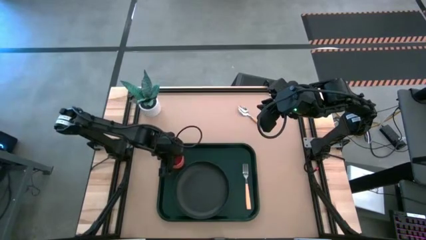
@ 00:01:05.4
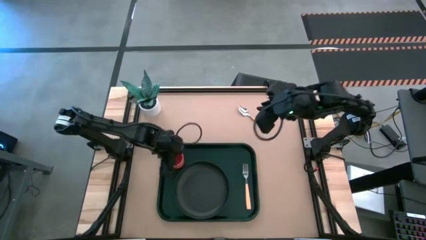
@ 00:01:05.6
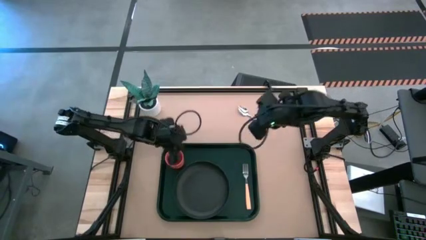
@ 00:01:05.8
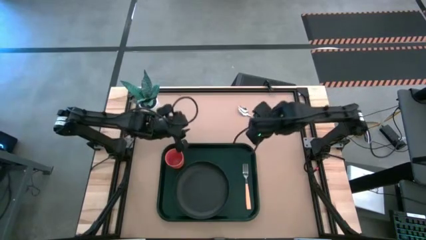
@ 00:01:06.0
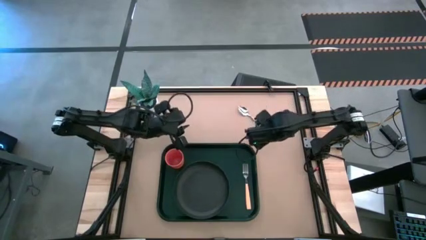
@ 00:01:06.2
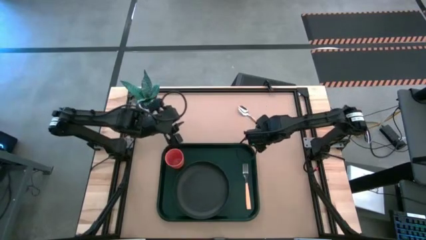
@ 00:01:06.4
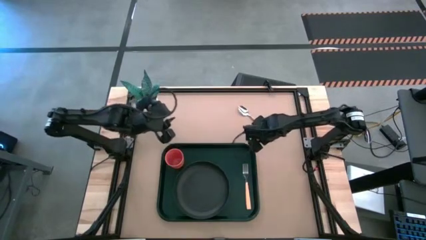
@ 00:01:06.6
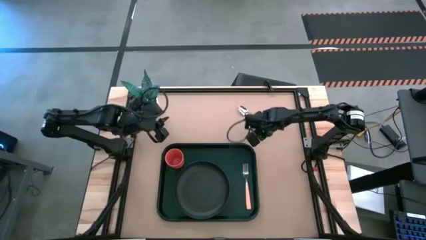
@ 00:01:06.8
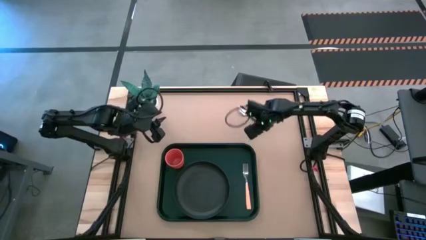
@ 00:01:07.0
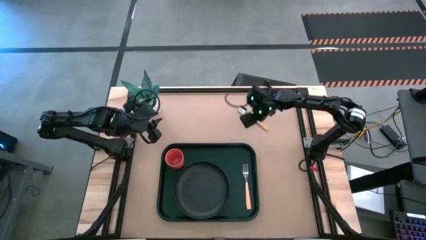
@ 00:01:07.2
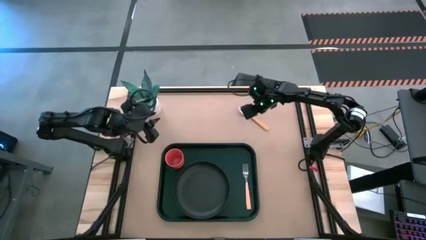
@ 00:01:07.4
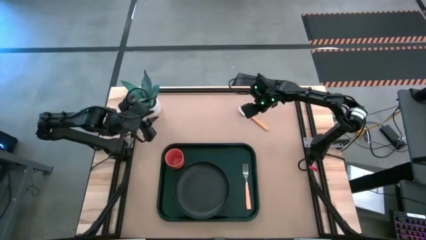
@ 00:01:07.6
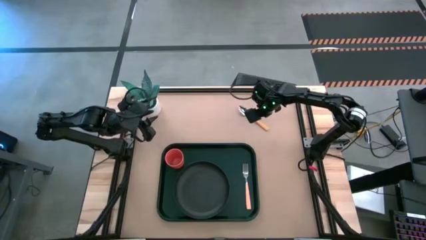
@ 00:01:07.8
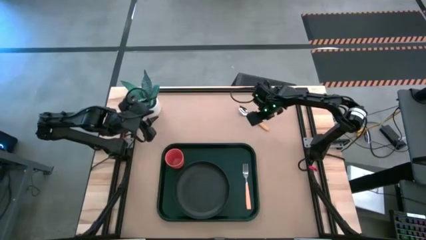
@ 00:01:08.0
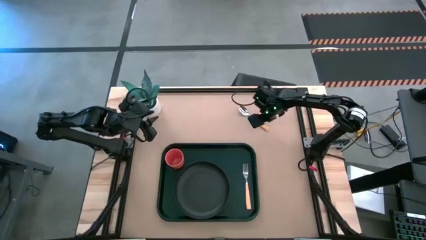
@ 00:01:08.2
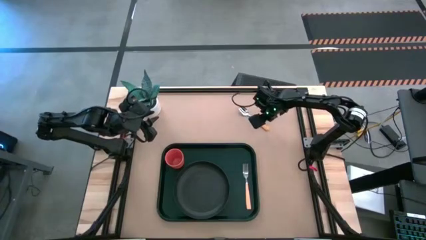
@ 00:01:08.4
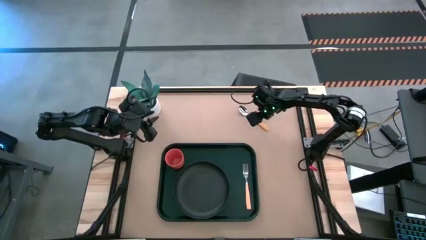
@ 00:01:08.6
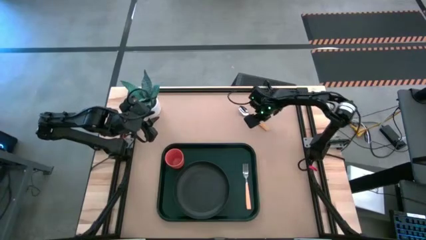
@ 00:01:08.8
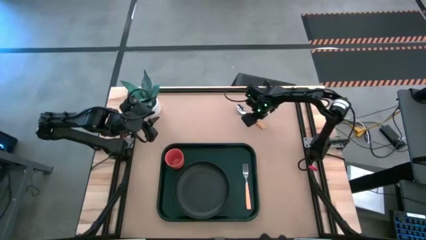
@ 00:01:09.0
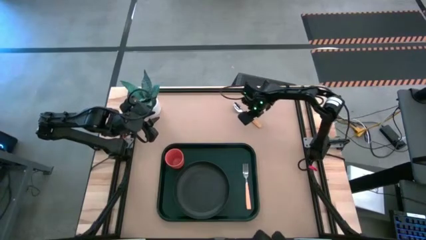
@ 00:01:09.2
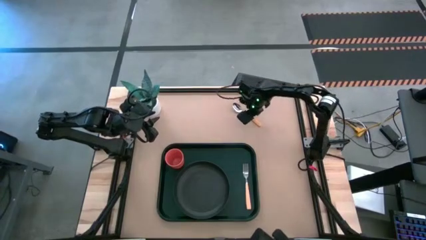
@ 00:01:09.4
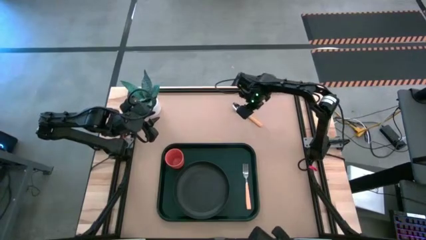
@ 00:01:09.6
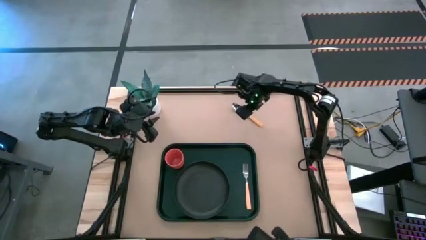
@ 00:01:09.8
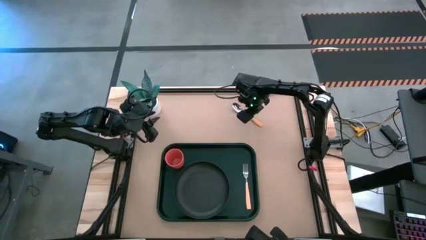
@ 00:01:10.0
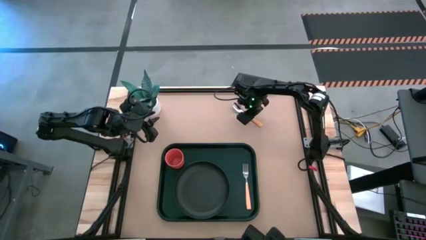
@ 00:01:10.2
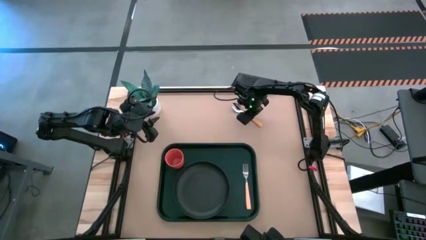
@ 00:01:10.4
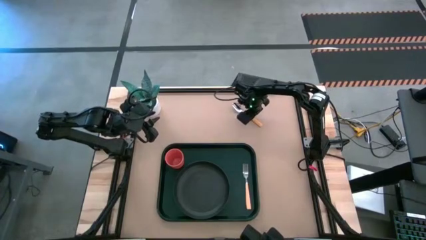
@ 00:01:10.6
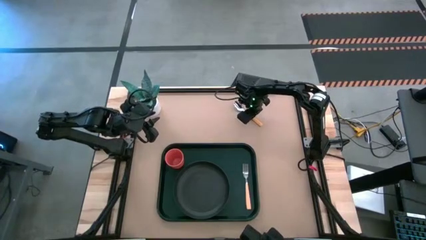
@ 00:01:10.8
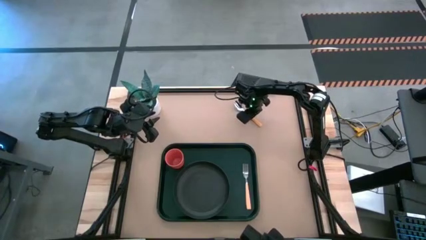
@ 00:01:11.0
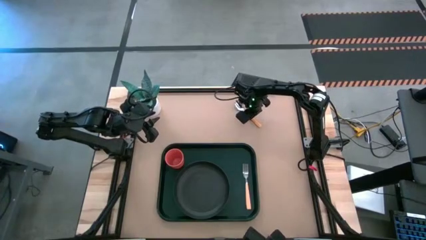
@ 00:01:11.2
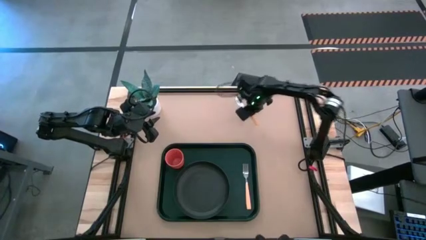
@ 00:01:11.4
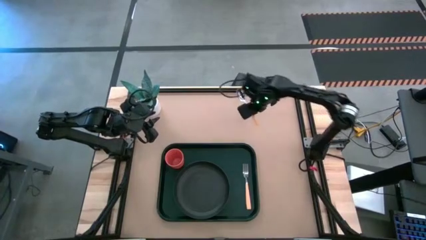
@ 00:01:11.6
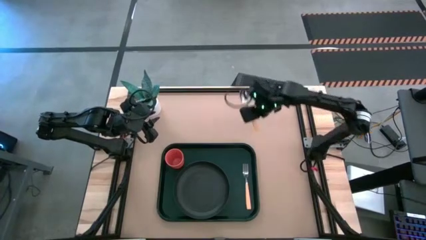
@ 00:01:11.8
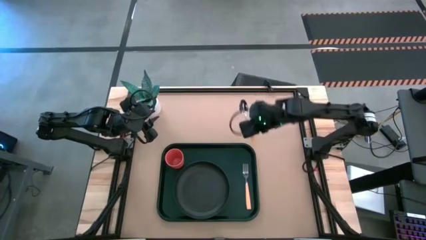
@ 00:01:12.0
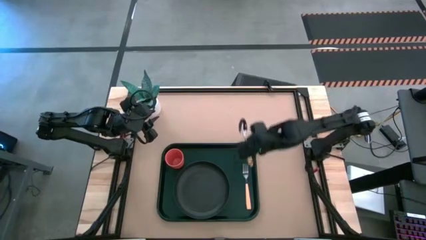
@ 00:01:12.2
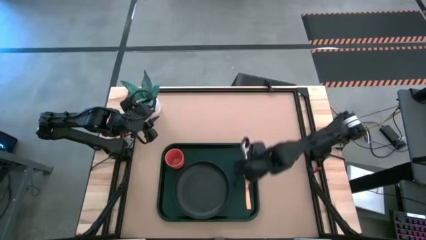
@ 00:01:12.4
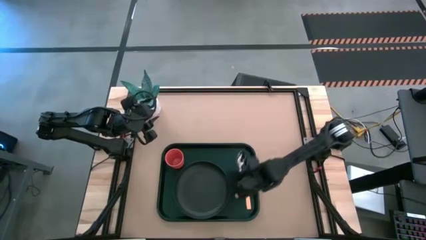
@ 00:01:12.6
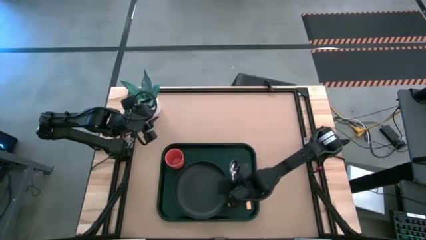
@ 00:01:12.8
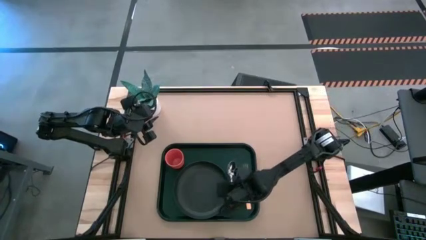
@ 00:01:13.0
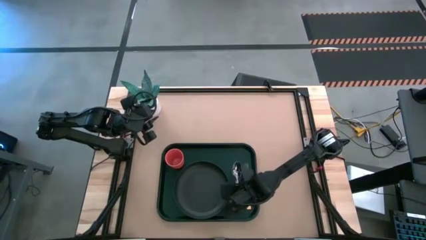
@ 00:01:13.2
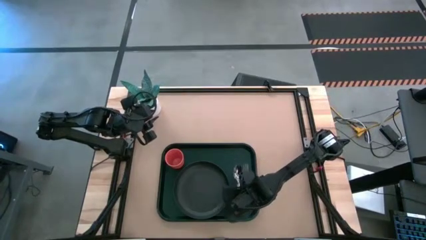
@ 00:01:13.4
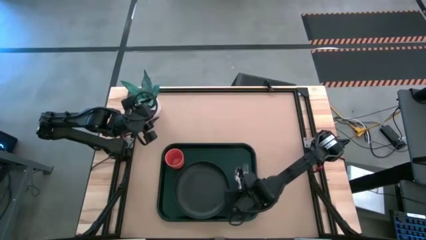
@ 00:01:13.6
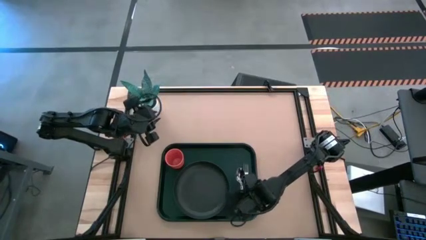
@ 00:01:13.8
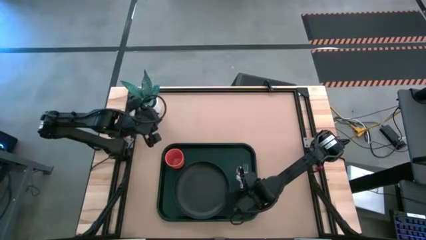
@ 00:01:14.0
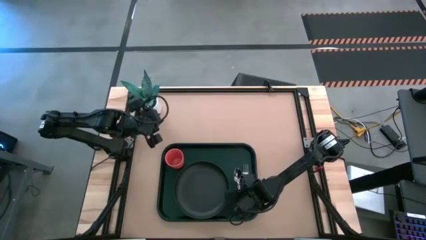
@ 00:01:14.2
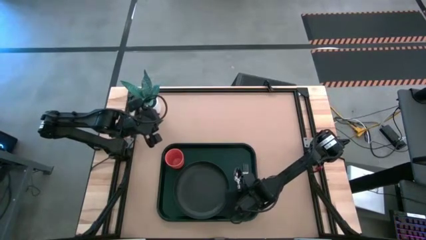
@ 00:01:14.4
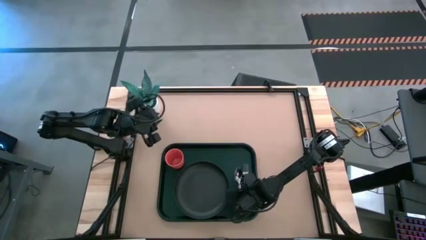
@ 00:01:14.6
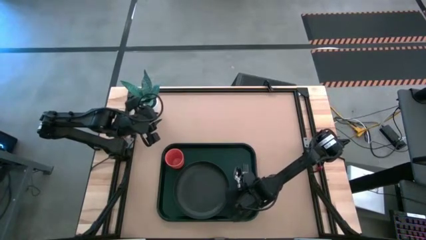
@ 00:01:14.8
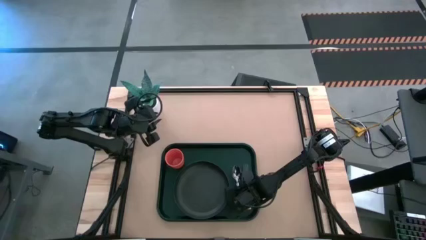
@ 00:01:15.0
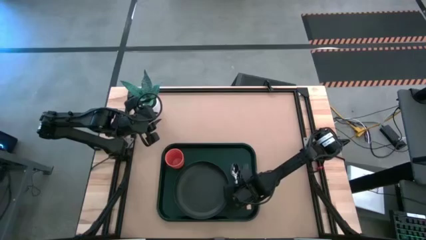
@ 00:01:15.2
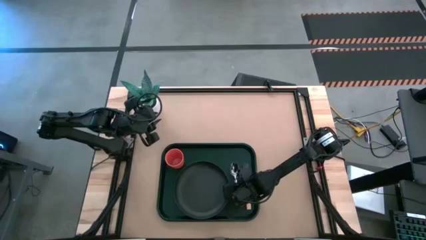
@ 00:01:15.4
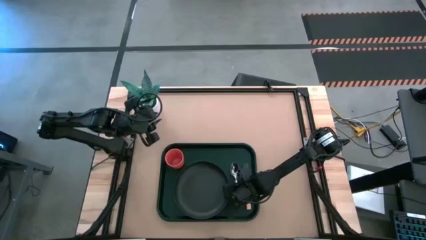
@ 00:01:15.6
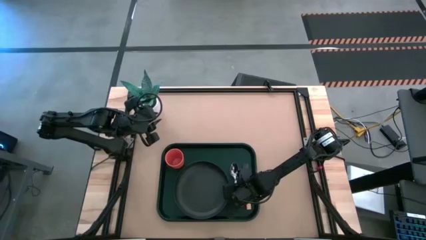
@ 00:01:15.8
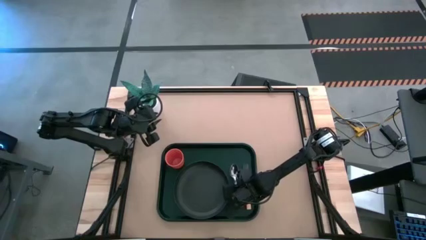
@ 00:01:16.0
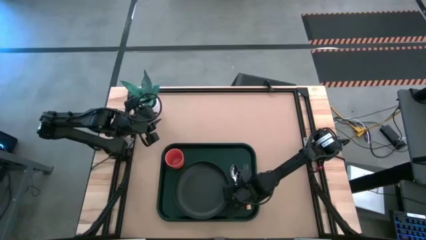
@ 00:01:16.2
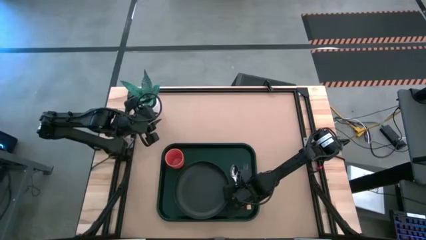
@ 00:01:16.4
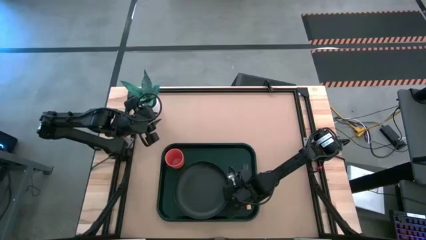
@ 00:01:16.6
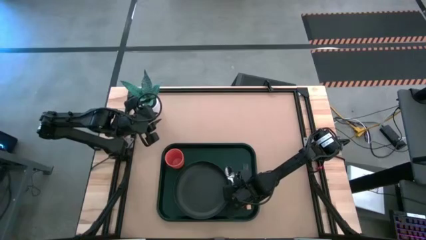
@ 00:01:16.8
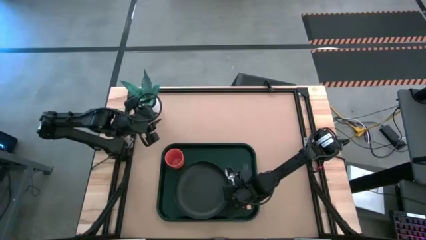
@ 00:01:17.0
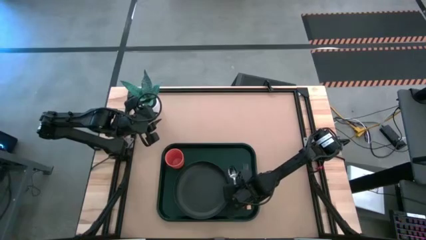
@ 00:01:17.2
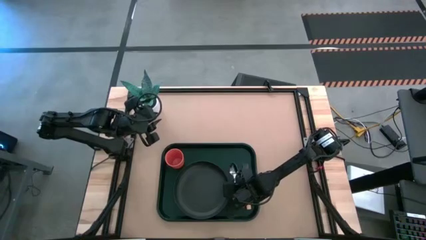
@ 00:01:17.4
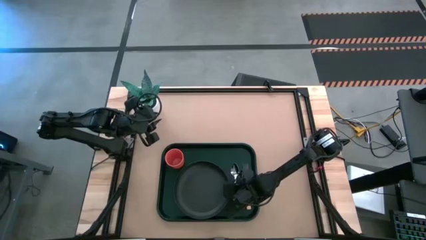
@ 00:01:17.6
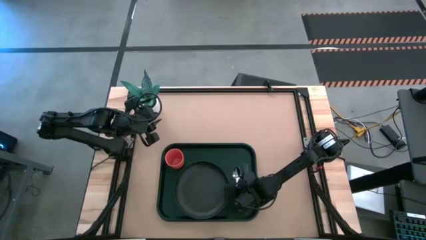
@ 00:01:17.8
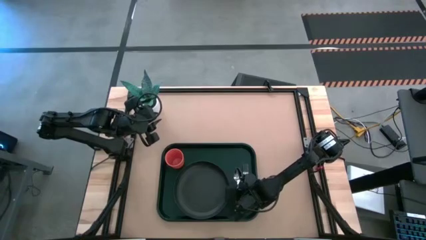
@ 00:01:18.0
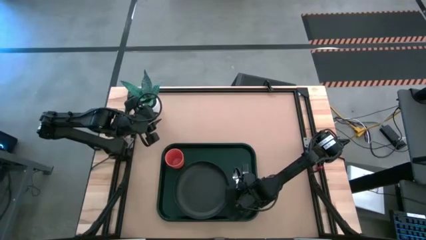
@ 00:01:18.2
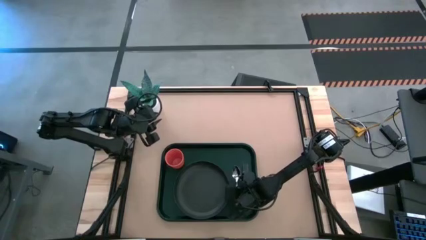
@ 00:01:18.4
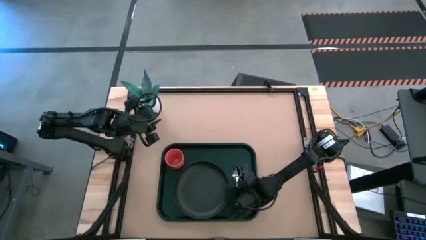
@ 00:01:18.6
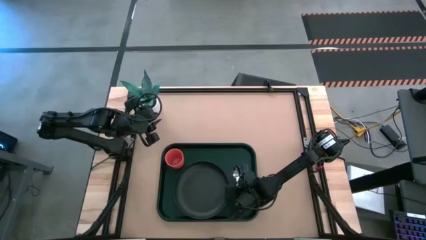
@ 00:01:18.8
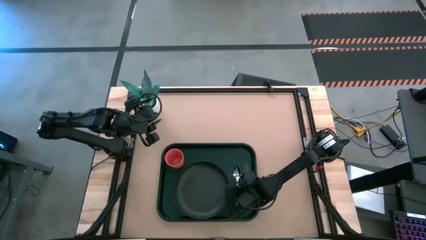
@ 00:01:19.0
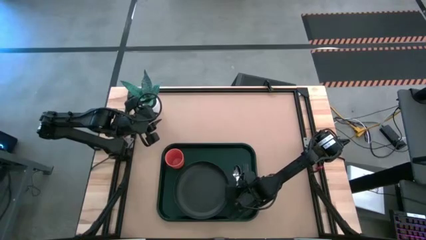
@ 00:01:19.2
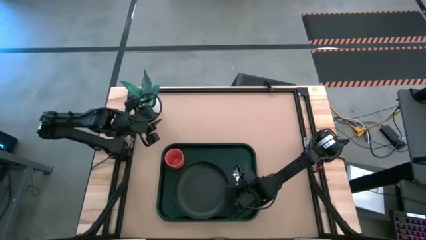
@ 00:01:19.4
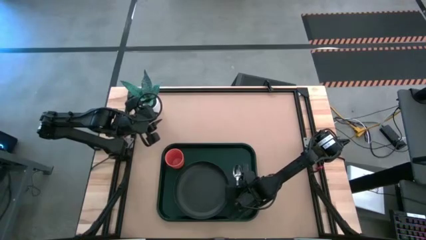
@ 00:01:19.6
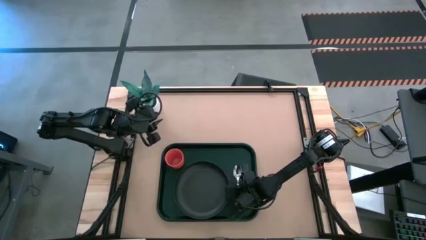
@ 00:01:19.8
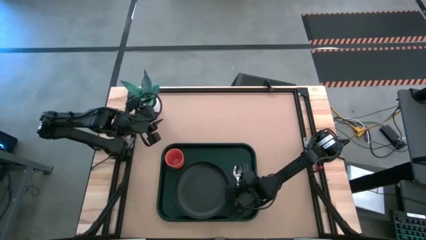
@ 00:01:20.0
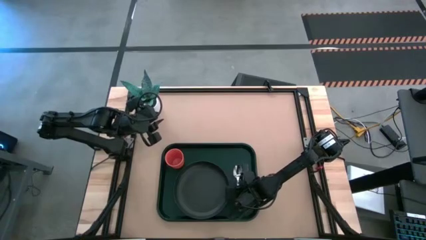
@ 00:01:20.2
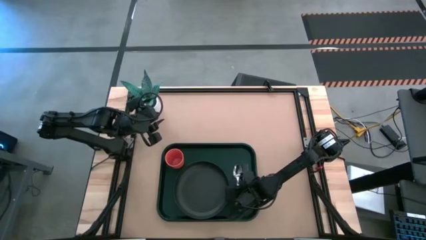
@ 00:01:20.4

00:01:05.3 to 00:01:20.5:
Task: Pick and place plate/cup/fork/spoon on tray
Put the yellow spoon on the black serving tray to the right side of the black plate
